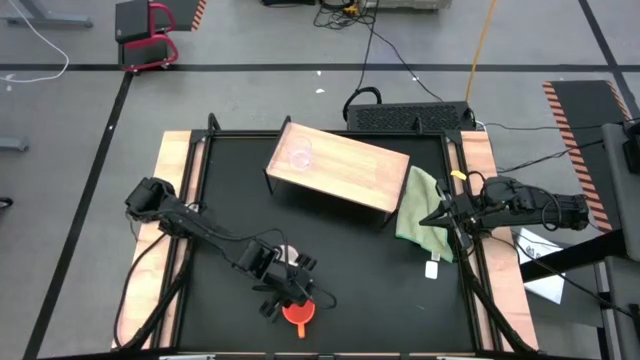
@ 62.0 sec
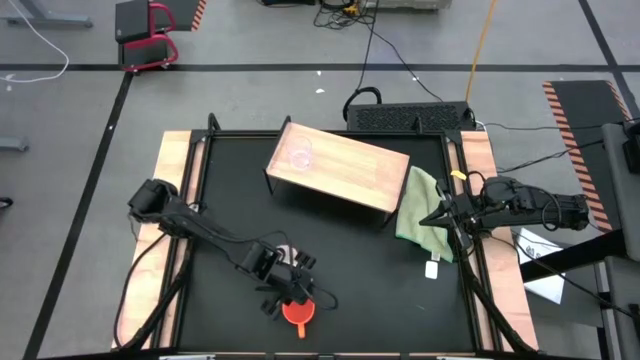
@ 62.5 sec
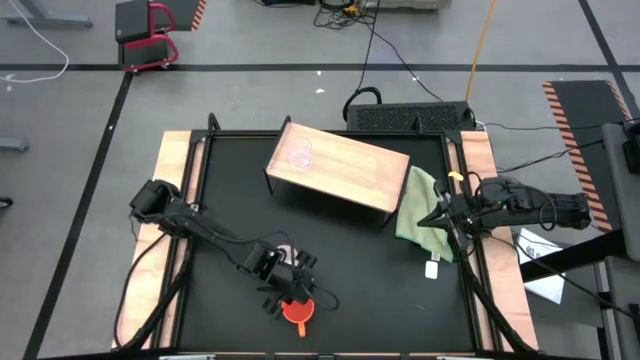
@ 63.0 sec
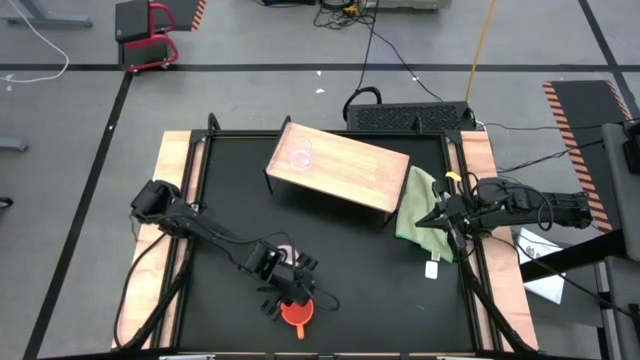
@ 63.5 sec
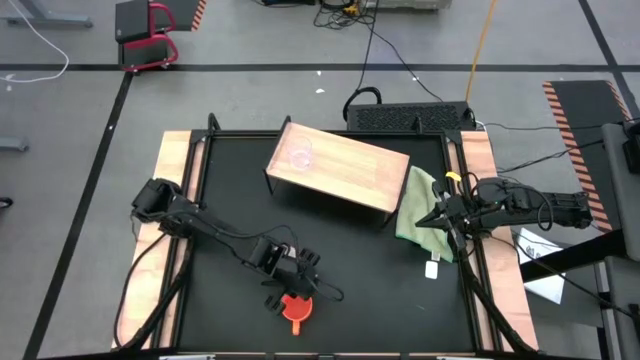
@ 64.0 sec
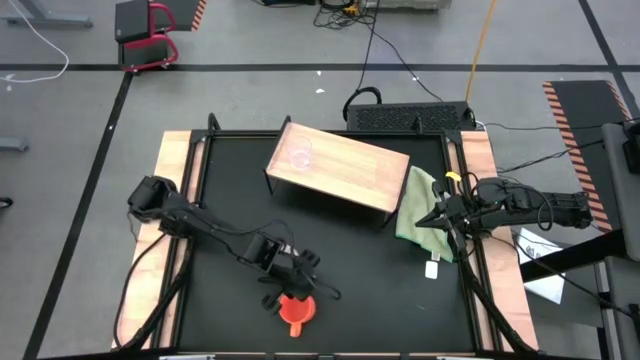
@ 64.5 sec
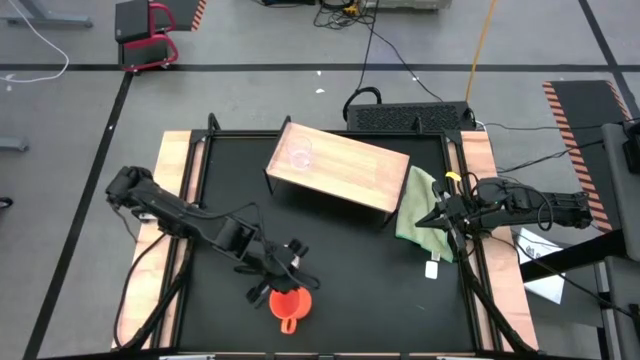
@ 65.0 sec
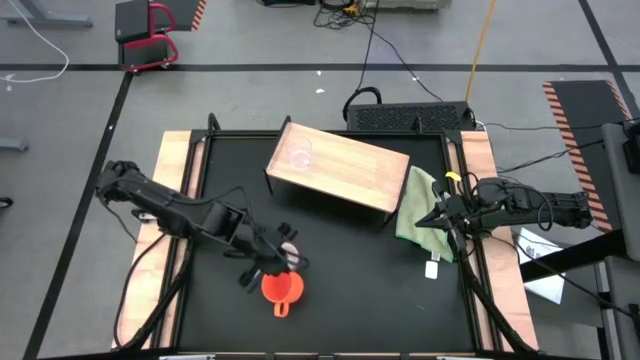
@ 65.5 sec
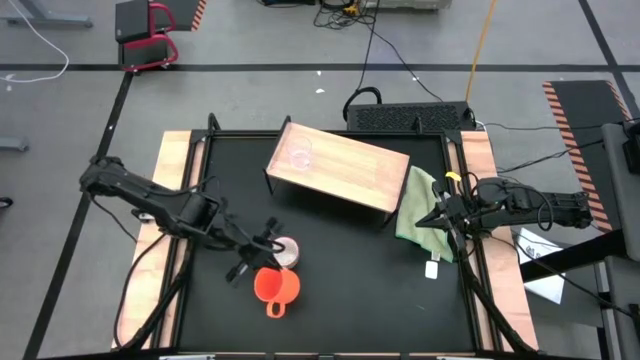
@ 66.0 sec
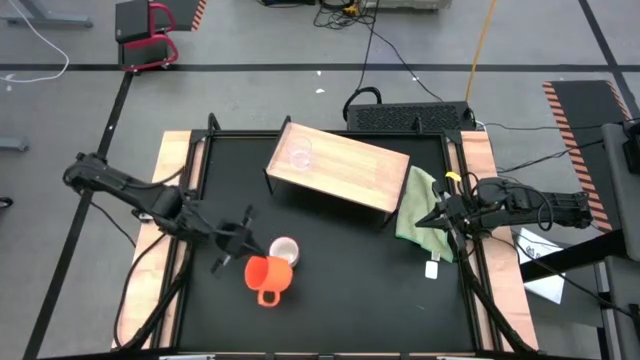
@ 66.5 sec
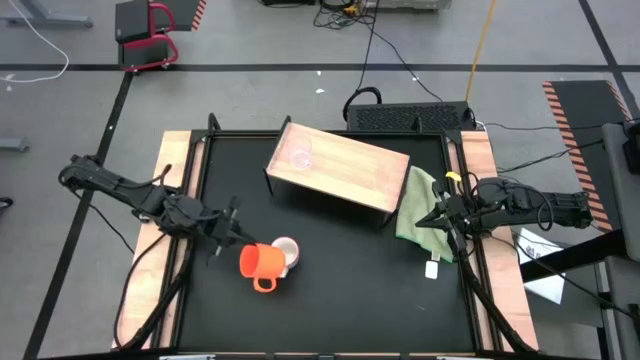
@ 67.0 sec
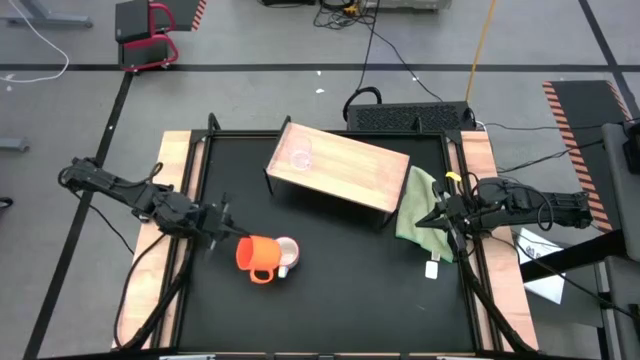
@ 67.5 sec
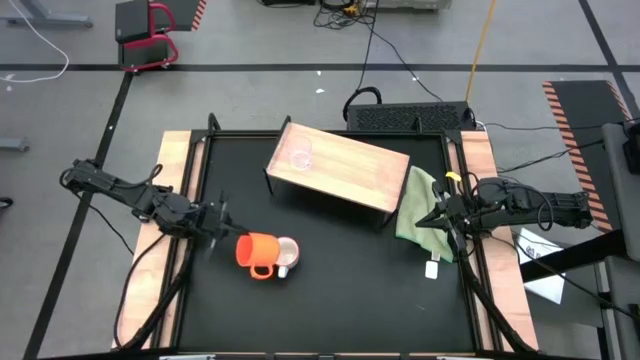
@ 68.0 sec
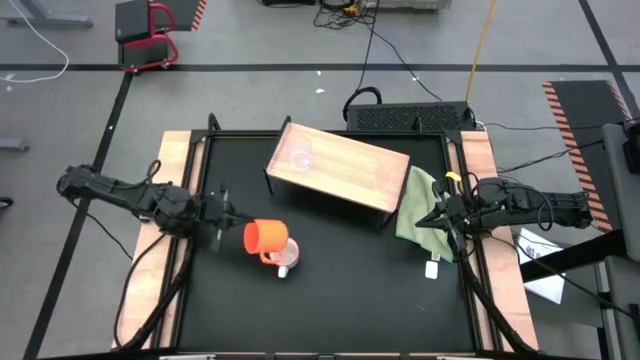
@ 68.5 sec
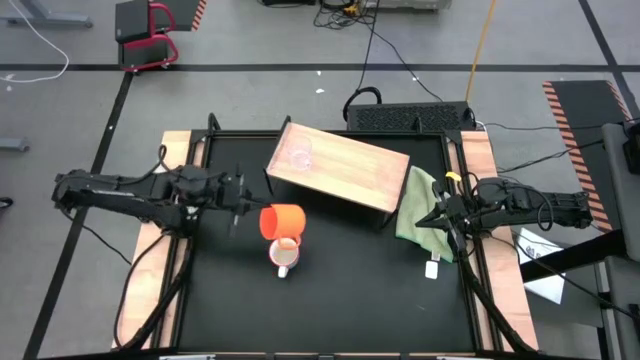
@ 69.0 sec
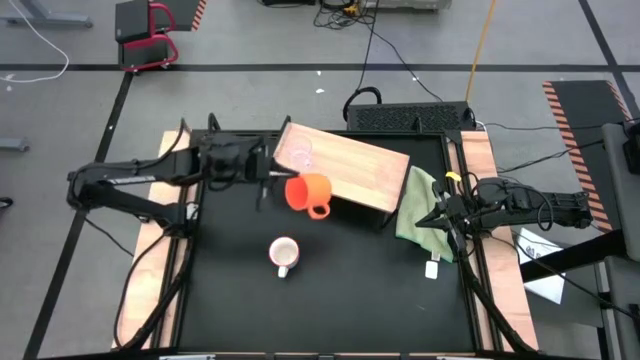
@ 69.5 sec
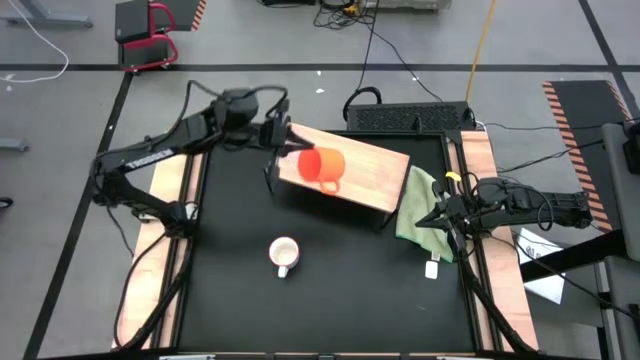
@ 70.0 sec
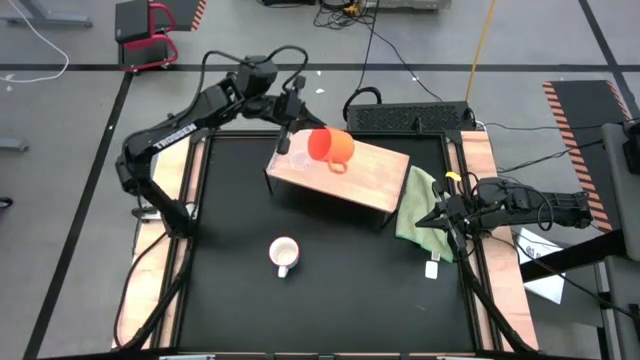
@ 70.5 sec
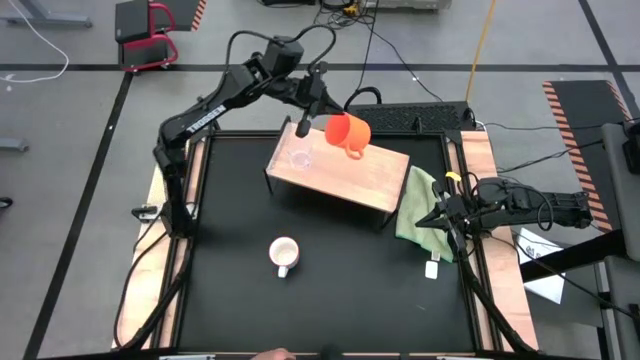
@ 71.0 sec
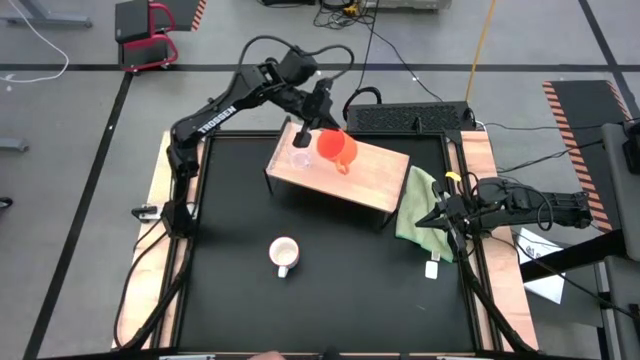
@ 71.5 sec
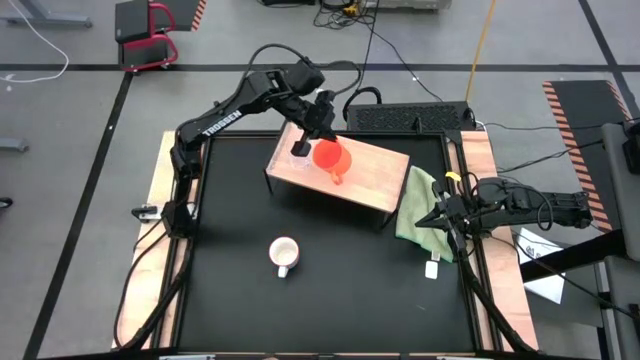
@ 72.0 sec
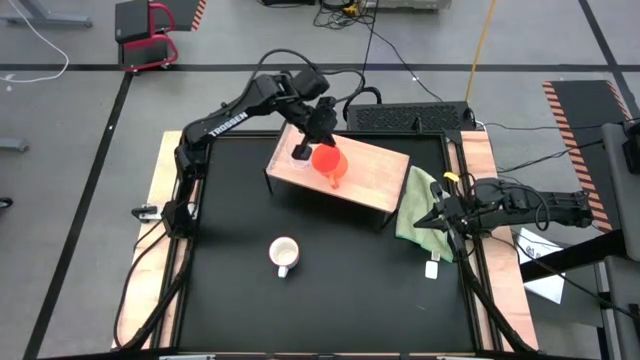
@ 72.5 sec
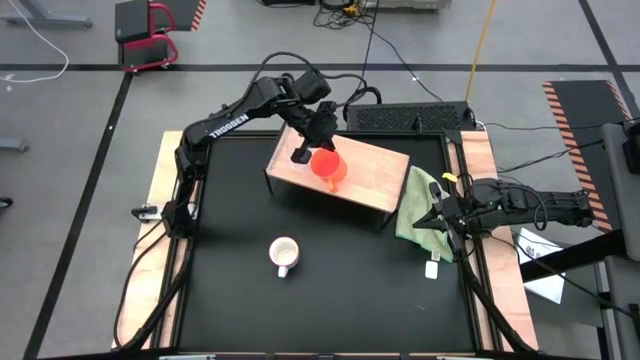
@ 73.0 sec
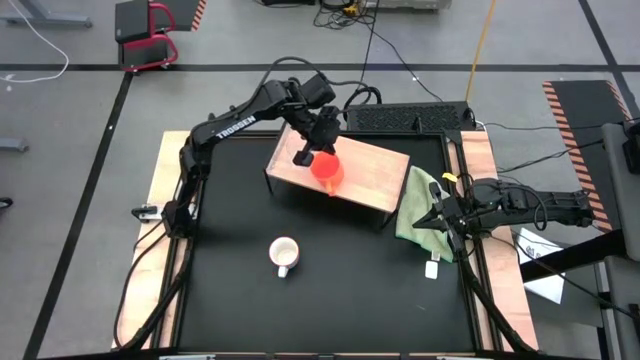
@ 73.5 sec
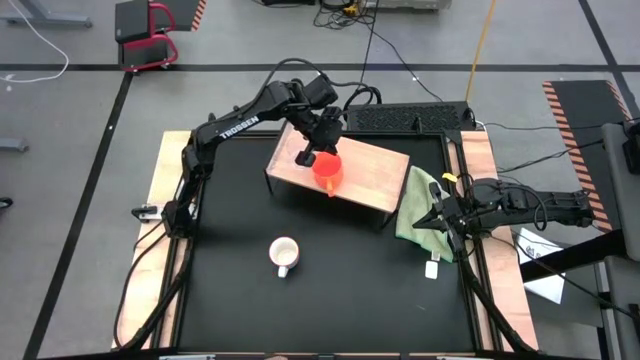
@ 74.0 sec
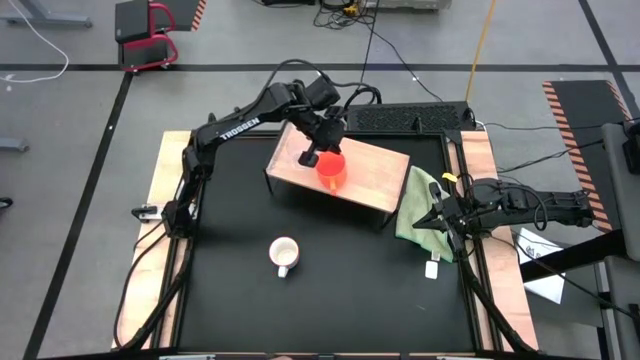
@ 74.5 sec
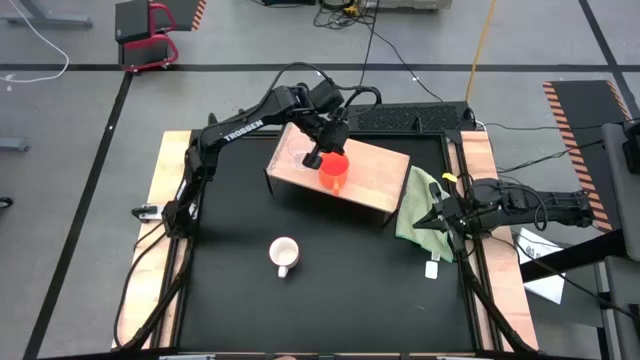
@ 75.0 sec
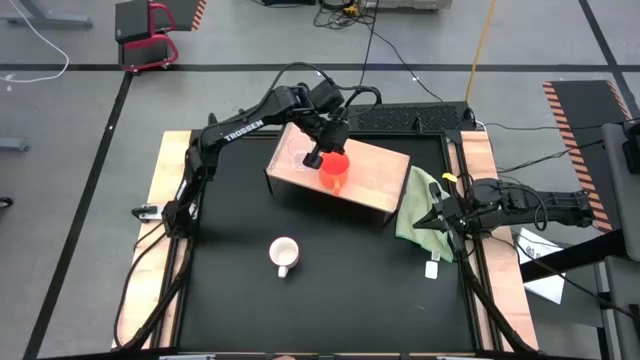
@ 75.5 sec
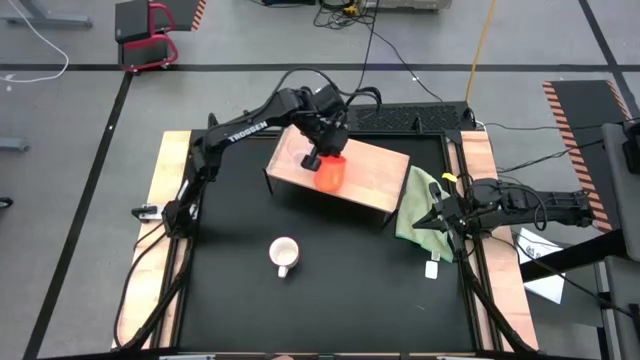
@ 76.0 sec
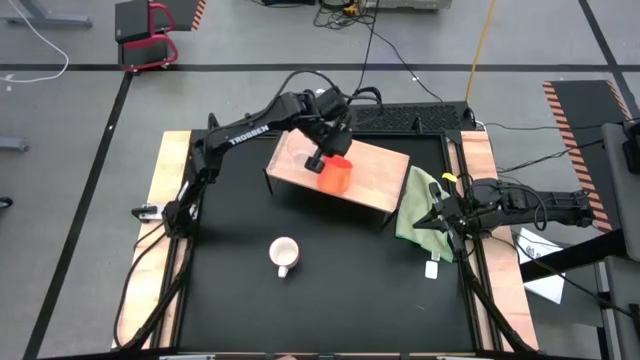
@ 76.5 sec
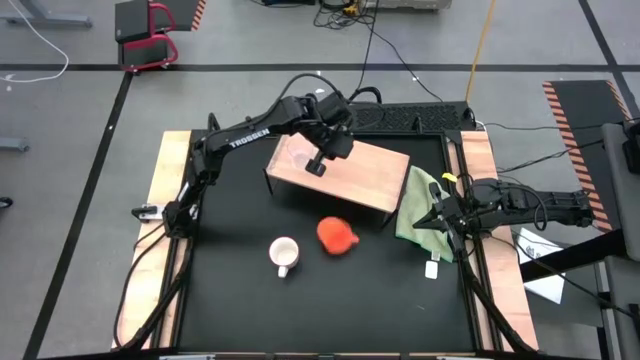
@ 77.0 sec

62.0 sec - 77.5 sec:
Task: Stack small to large cups/mugs on shelf
Put the orange mug on the shelf
